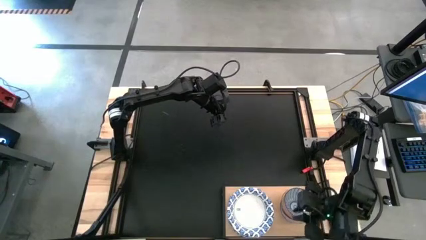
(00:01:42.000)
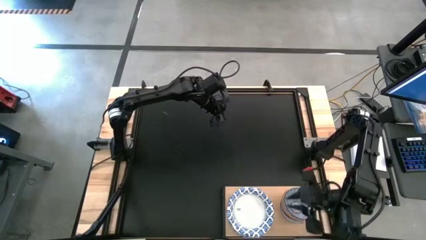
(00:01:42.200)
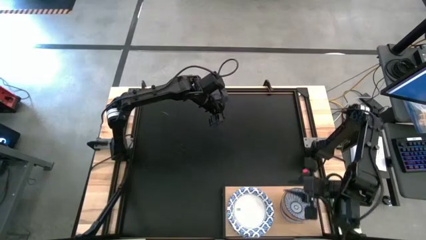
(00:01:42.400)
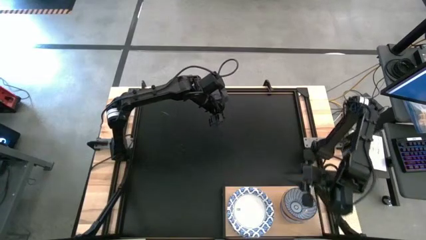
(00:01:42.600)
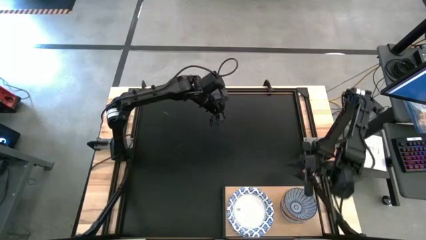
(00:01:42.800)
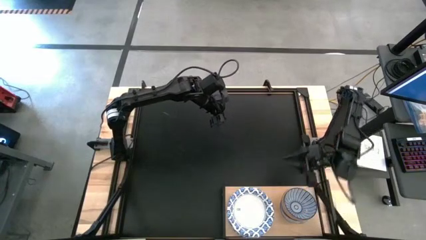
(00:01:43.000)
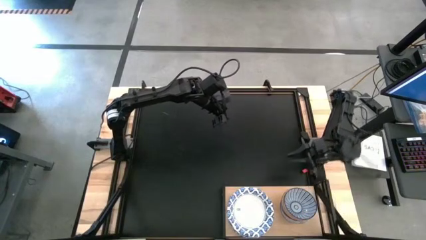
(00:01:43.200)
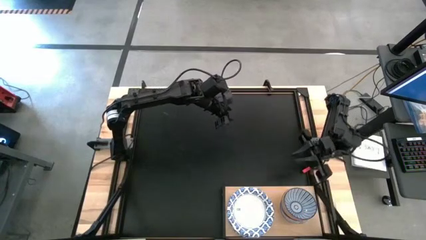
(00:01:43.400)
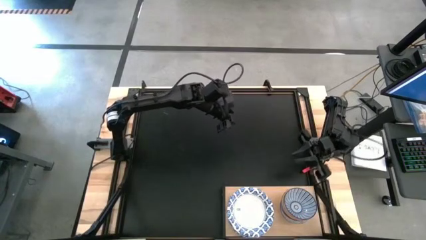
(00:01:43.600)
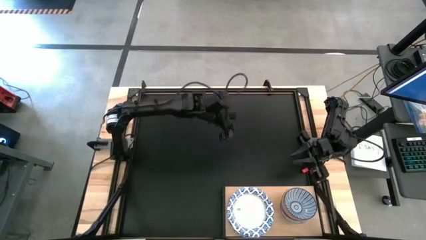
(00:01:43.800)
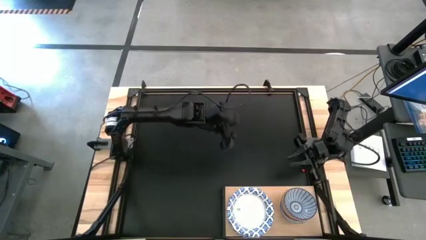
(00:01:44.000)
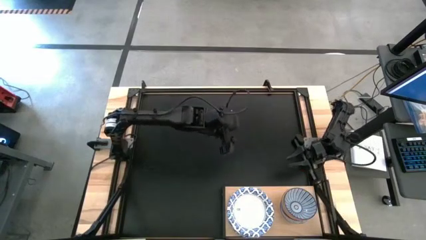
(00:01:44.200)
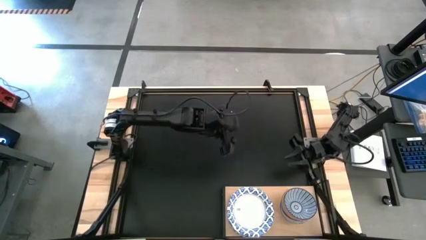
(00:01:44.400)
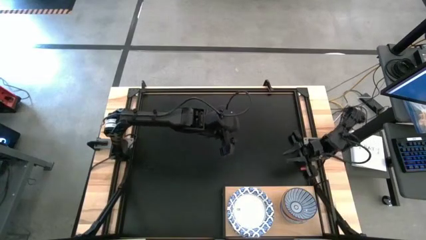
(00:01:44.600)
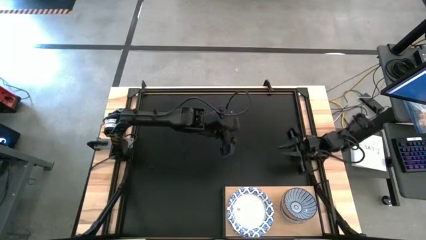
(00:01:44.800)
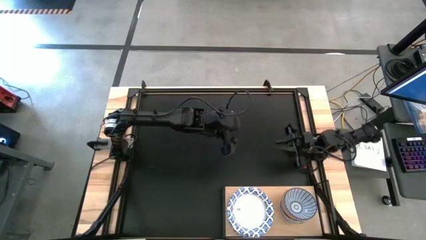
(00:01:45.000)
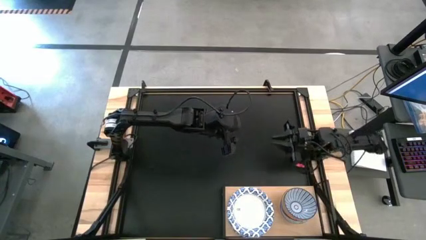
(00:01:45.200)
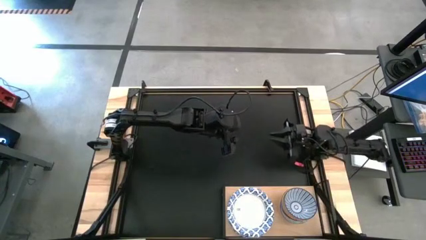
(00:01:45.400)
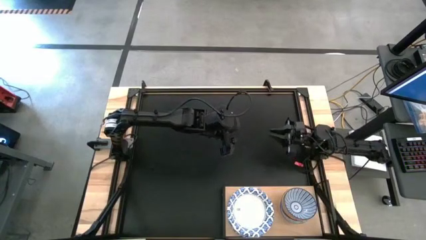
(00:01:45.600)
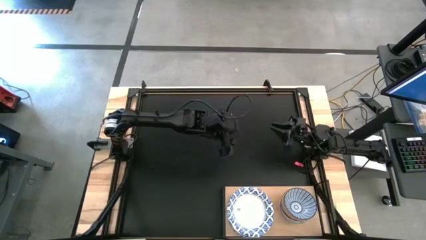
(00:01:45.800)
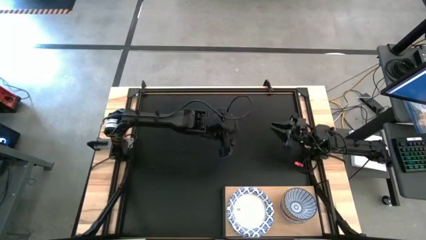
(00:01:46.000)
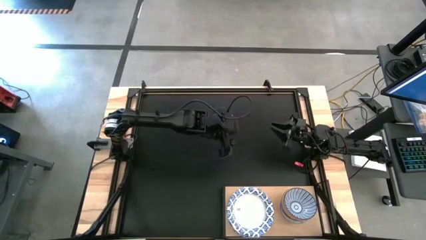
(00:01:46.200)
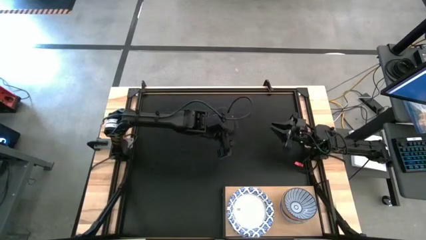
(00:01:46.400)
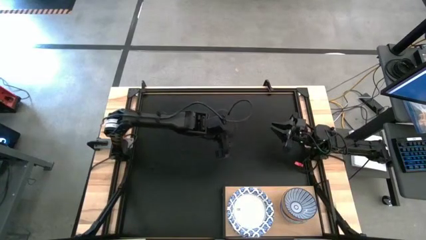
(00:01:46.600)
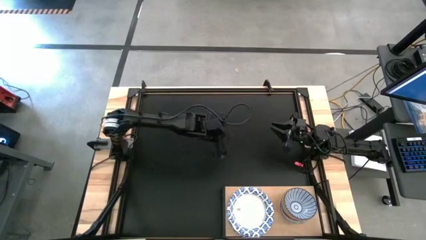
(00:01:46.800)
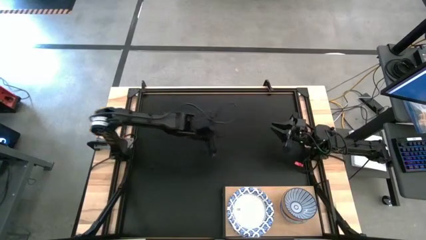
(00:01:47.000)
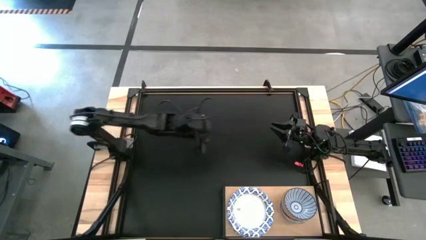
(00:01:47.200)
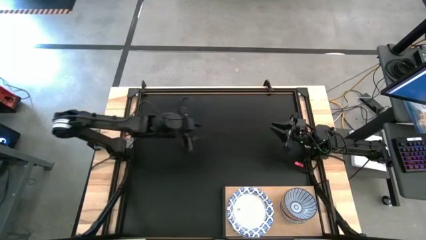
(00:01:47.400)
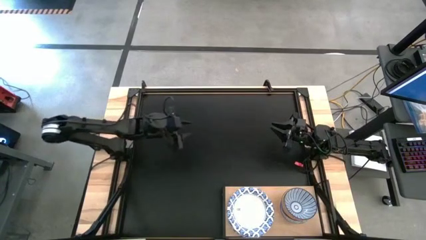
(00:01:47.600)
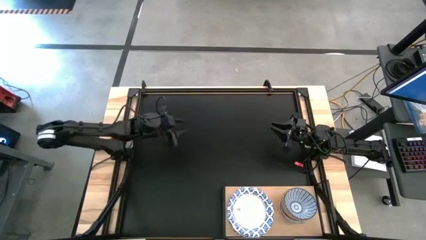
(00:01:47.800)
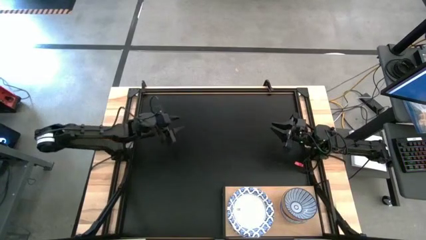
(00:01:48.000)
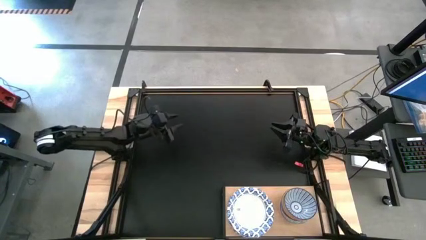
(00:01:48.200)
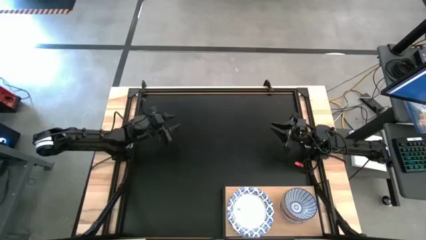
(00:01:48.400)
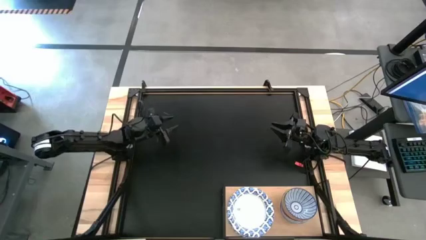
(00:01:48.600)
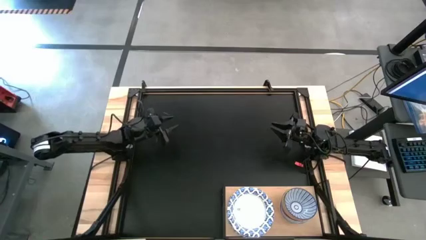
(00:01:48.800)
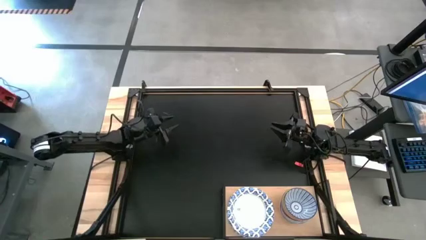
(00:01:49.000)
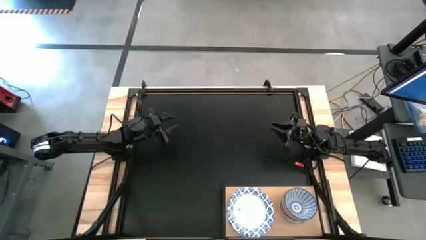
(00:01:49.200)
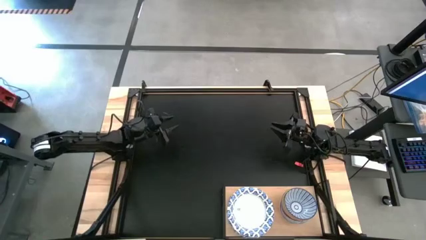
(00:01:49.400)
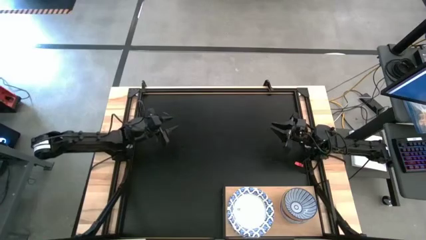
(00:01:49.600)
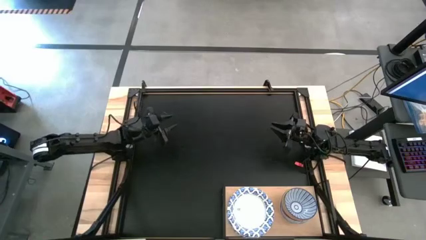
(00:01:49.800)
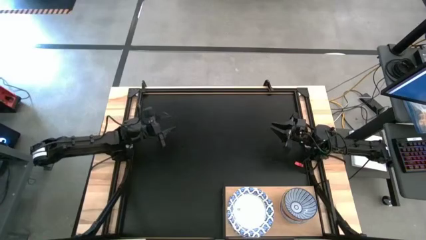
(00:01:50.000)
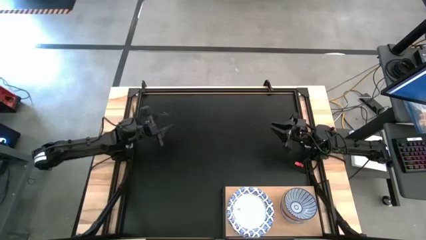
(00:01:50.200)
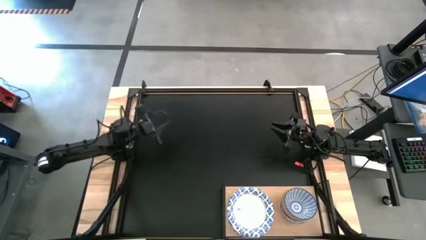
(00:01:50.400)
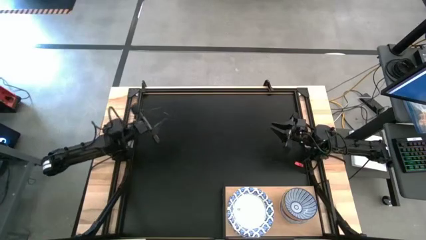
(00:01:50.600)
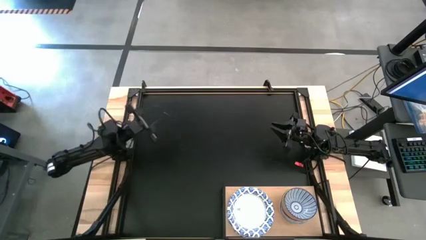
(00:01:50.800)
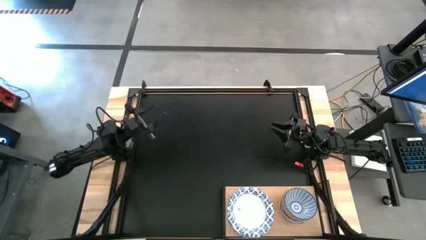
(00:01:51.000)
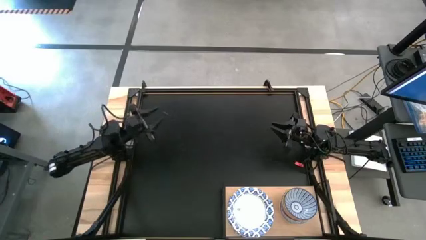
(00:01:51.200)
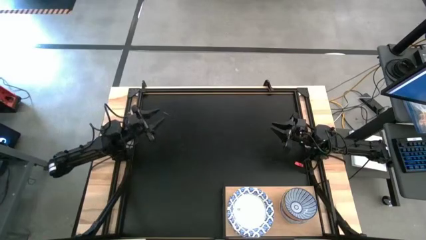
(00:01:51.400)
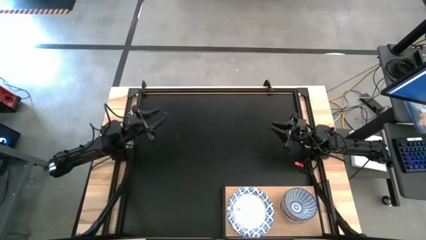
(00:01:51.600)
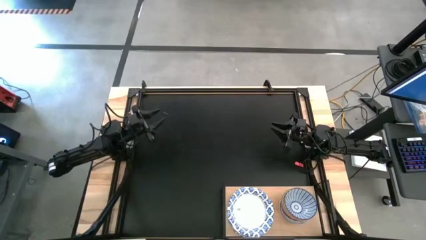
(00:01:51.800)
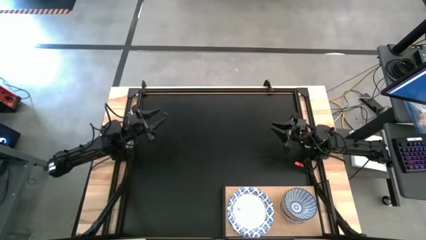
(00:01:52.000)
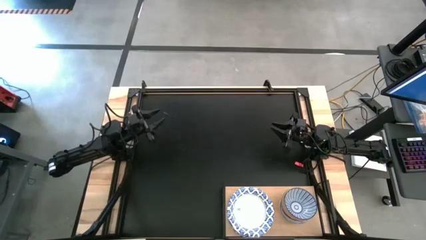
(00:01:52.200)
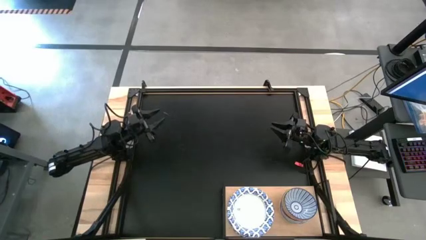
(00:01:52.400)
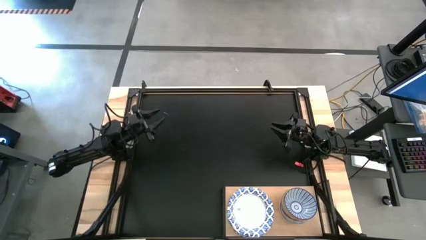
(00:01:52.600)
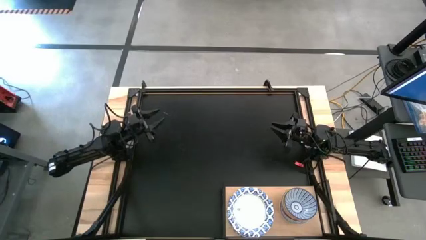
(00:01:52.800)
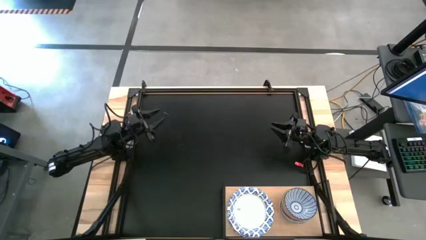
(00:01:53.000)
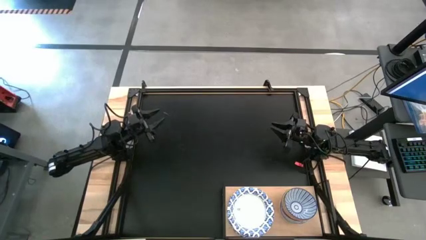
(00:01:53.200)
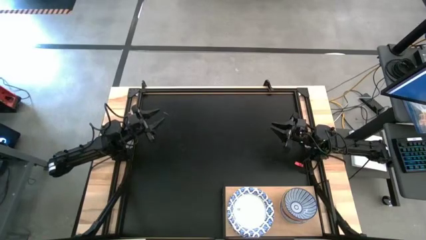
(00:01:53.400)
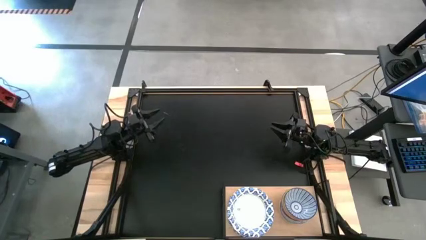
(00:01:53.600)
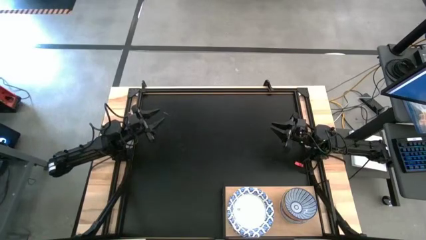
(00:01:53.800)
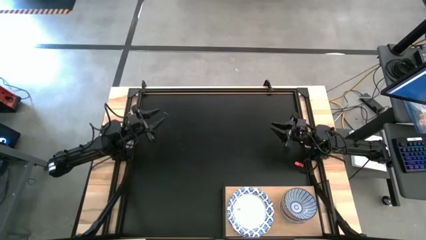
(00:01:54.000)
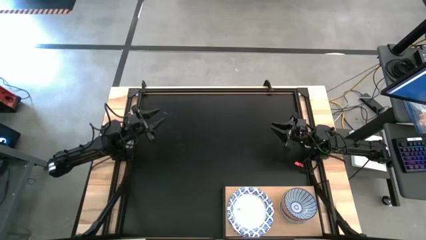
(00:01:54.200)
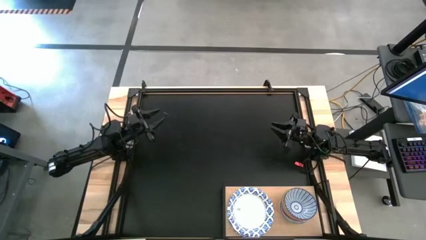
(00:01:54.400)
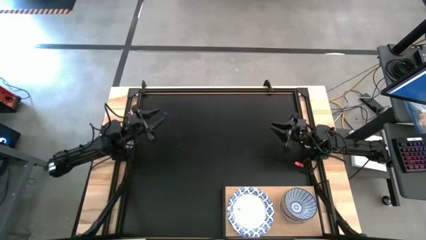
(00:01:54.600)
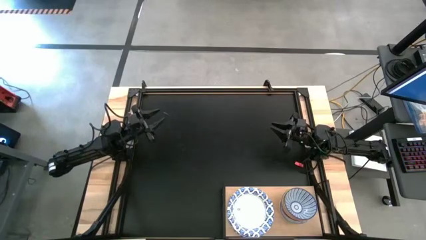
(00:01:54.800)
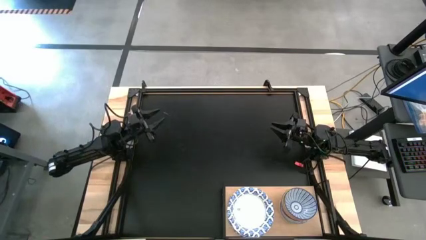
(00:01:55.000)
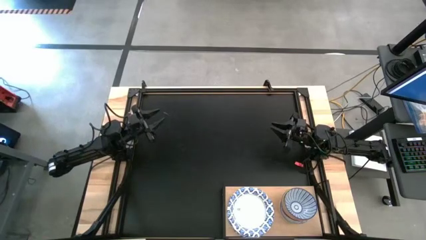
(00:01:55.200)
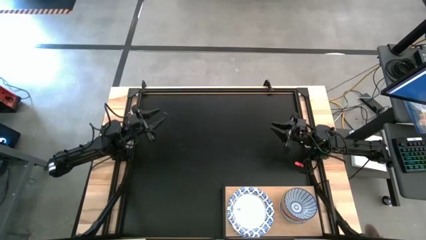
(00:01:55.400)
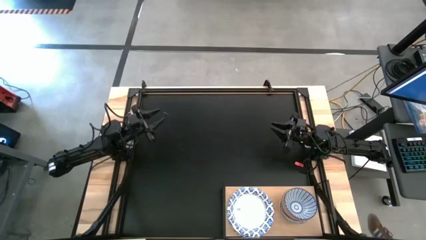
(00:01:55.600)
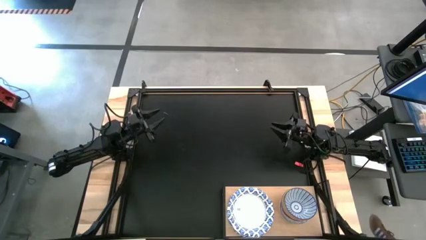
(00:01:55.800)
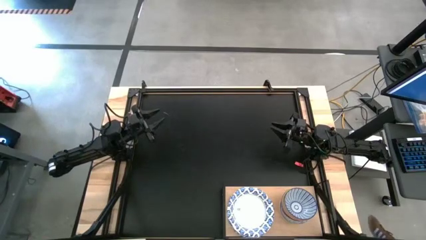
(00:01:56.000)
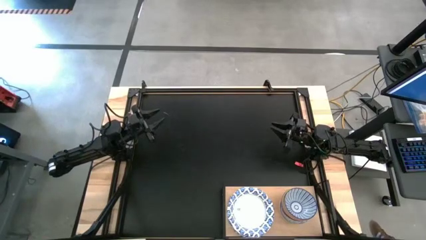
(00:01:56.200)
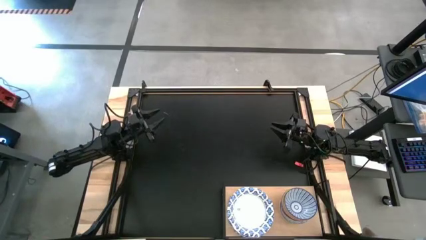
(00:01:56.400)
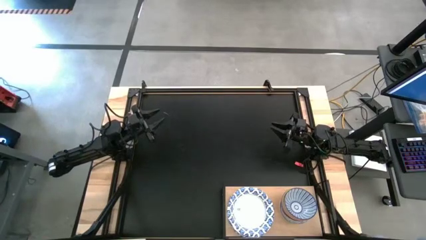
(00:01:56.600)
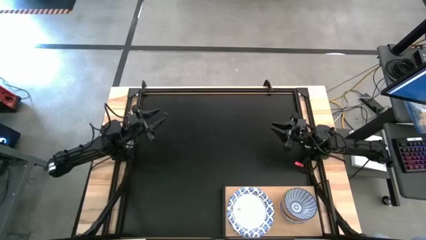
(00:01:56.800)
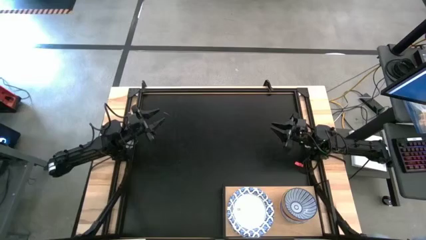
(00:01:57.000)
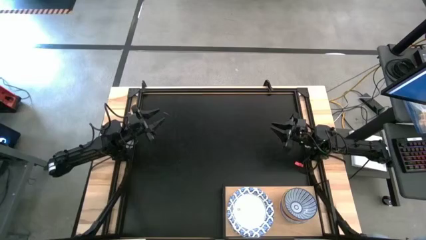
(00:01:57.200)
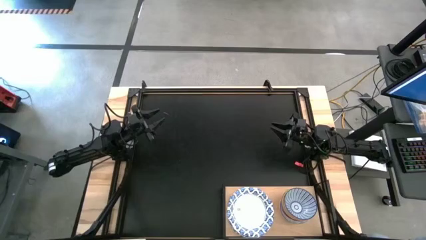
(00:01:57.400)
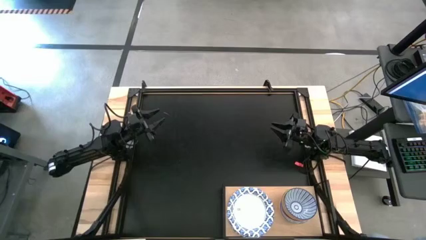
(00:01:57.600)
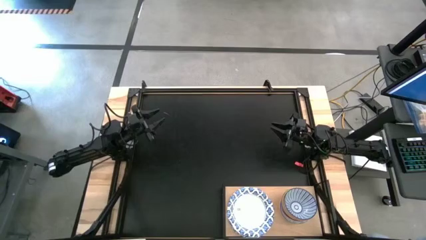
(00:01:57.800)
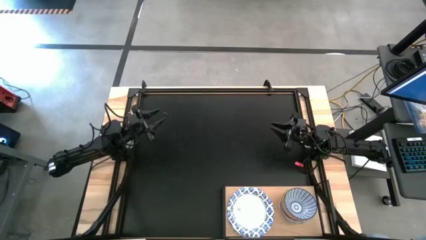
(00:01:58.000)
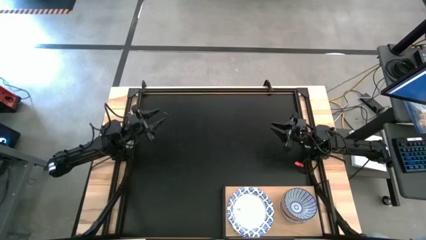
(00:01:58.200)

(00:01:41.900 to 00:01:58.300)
Task: Place and stack bowls onto a shelf
Return to Home Position

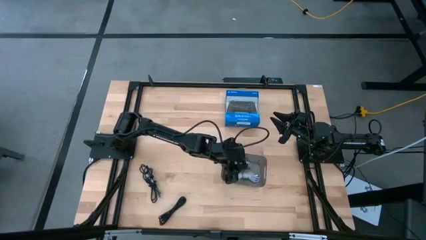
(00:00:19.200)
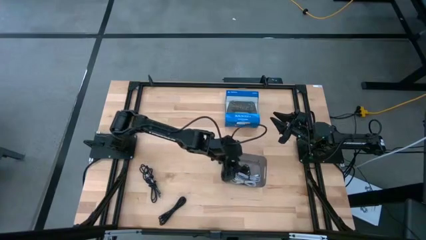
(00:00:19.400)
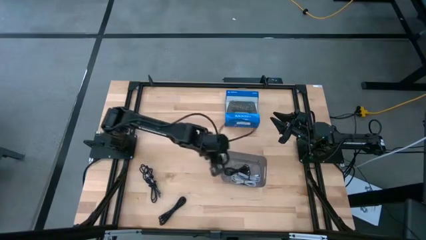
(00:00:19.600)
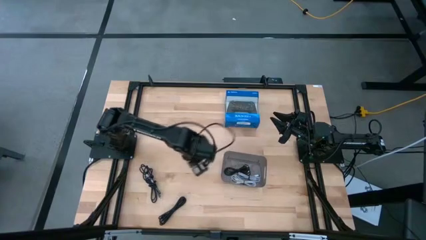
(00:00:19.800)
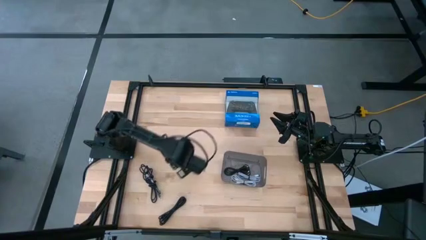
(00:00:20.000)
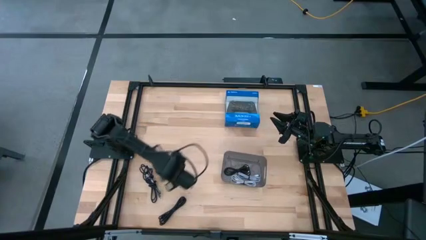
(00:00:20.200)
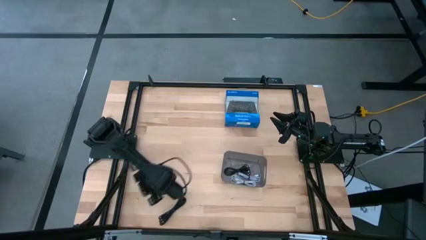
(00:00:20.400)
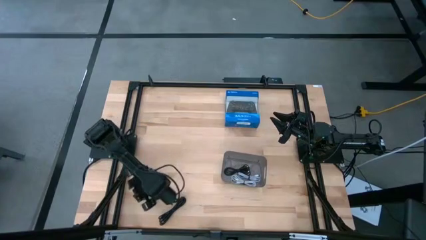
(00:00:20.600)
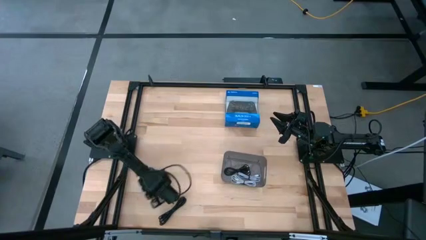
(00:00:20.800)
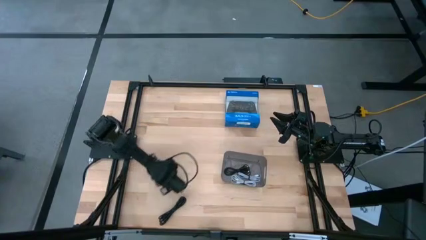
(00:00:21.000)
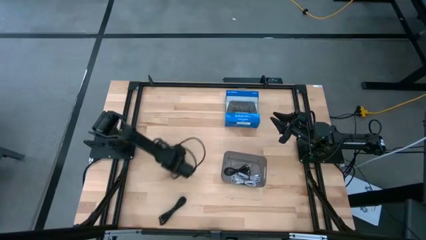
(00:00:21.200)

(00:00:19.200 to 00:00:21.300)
Task: Pick and place USB-C Cables
Adjust the top black charger cable
